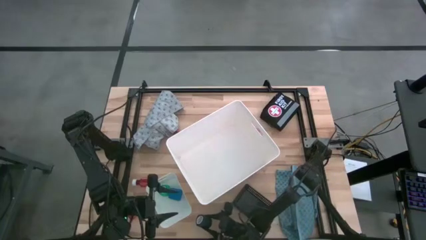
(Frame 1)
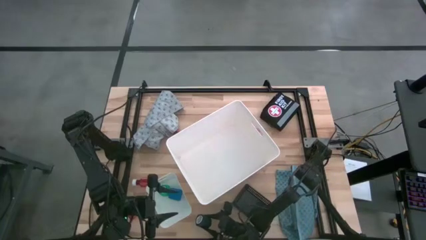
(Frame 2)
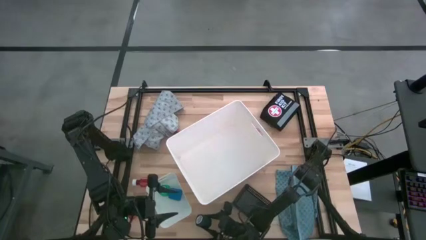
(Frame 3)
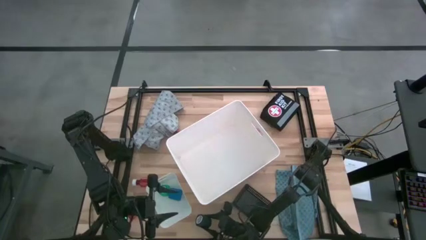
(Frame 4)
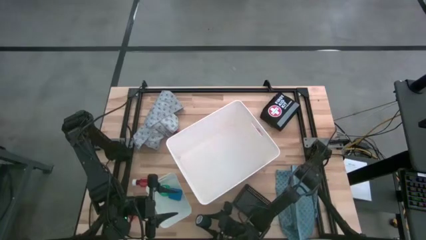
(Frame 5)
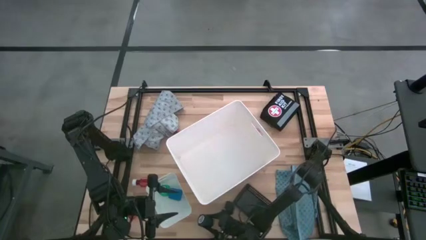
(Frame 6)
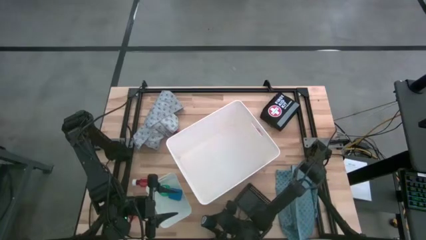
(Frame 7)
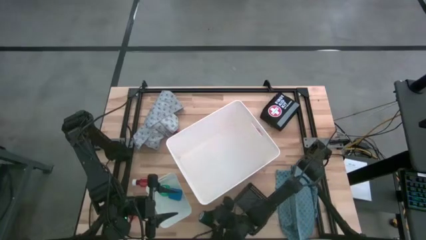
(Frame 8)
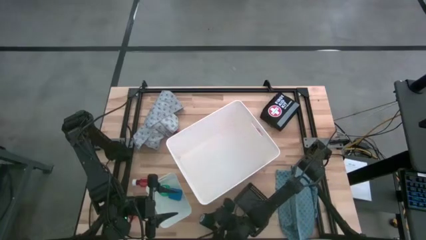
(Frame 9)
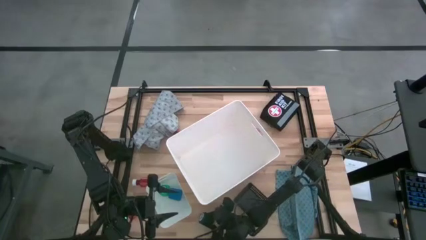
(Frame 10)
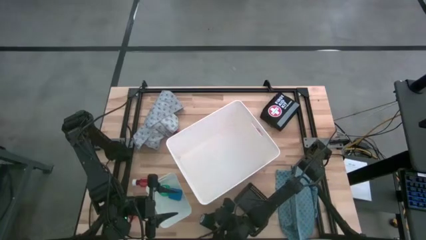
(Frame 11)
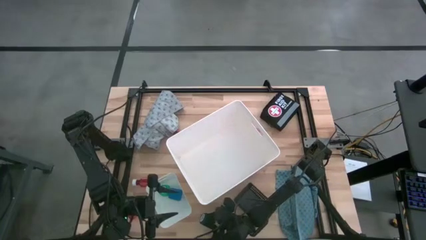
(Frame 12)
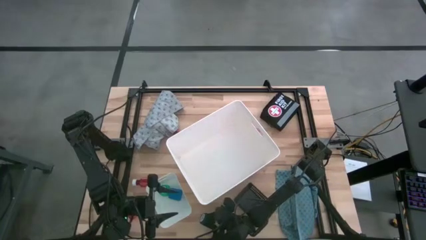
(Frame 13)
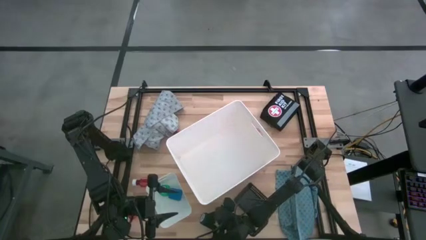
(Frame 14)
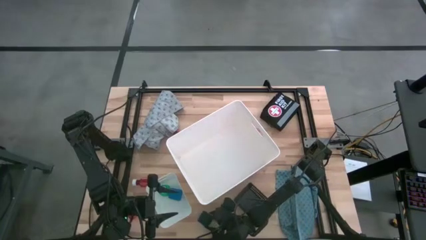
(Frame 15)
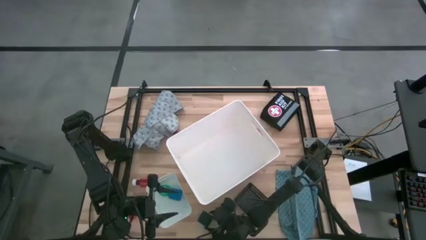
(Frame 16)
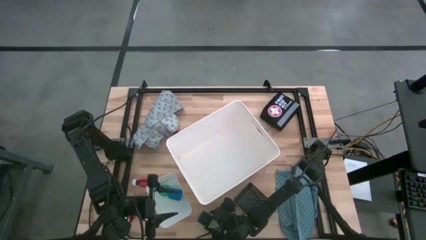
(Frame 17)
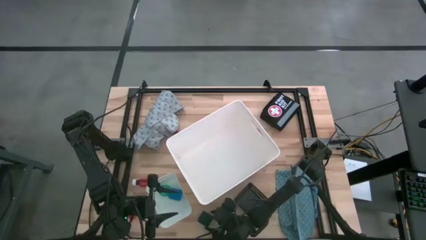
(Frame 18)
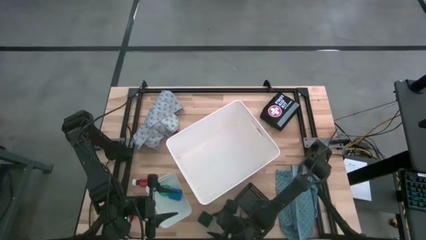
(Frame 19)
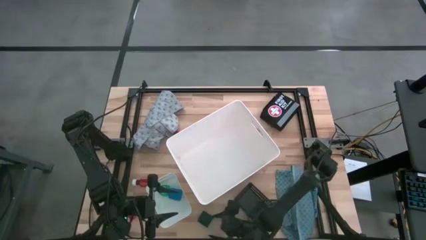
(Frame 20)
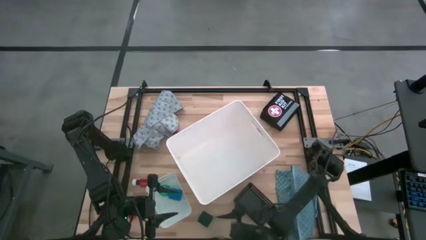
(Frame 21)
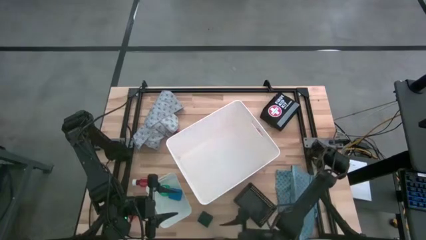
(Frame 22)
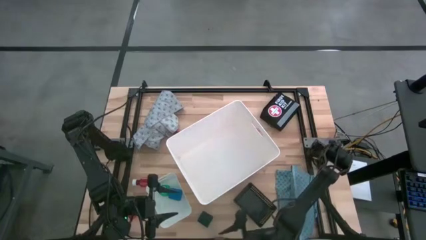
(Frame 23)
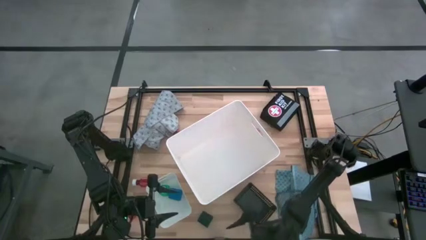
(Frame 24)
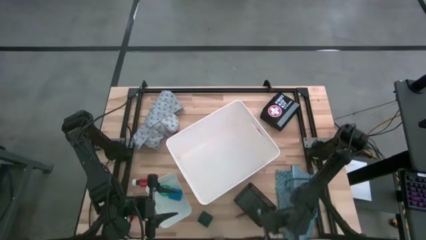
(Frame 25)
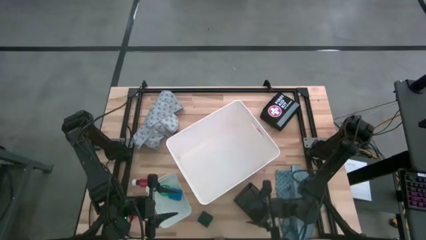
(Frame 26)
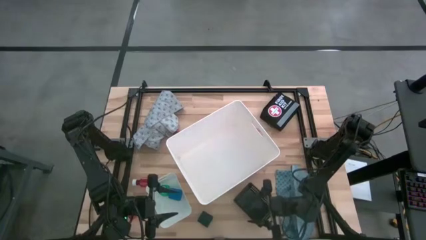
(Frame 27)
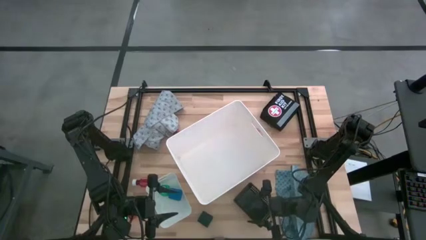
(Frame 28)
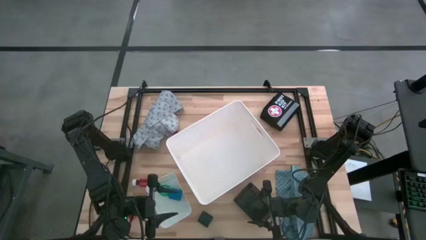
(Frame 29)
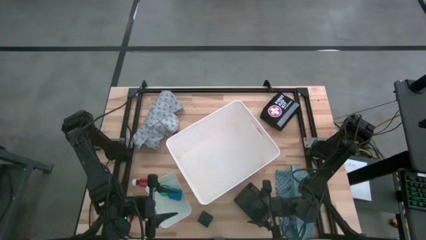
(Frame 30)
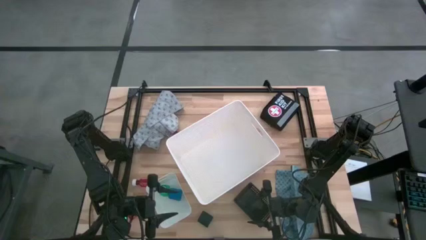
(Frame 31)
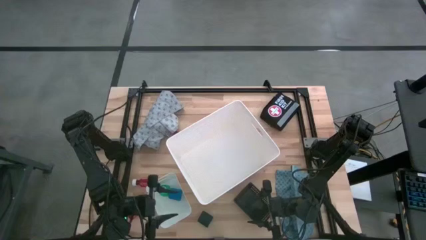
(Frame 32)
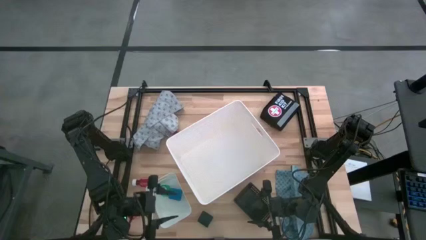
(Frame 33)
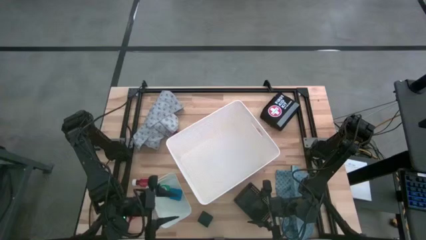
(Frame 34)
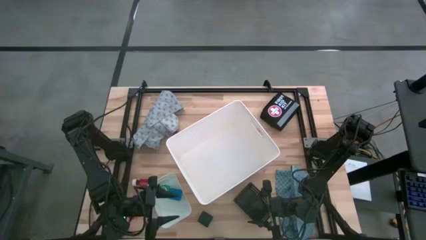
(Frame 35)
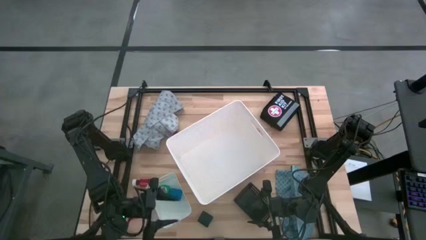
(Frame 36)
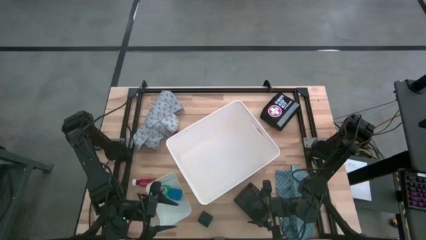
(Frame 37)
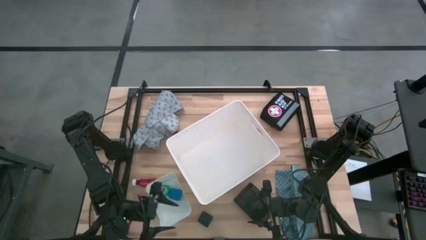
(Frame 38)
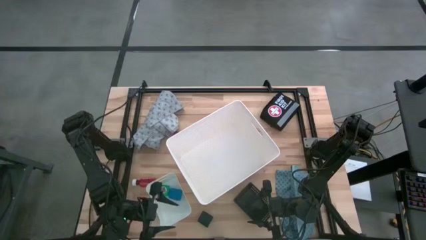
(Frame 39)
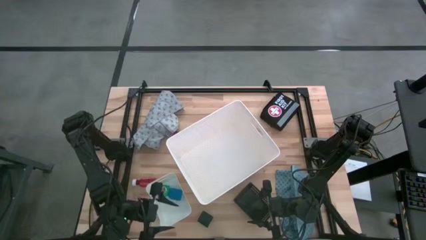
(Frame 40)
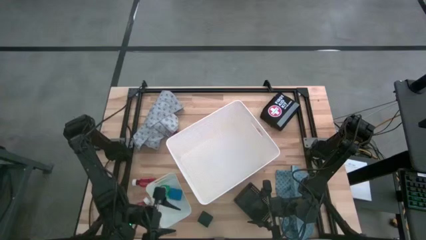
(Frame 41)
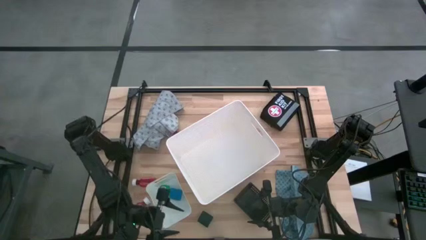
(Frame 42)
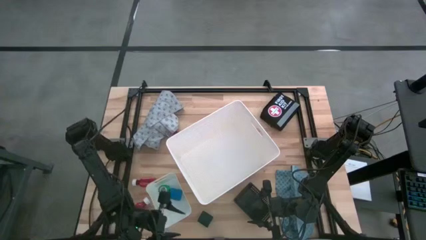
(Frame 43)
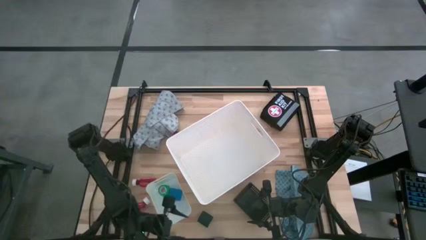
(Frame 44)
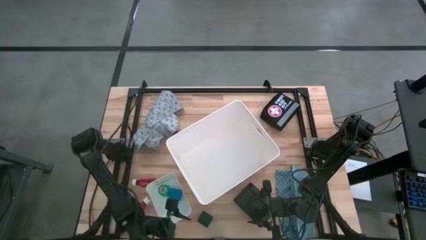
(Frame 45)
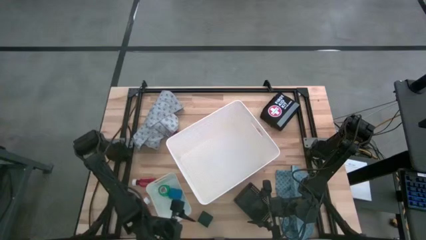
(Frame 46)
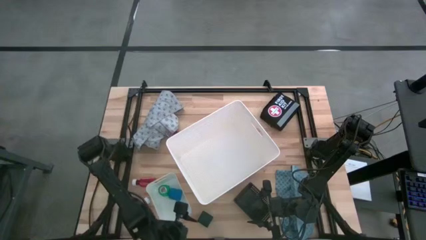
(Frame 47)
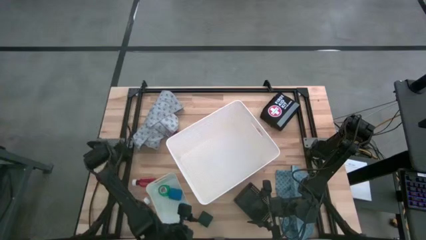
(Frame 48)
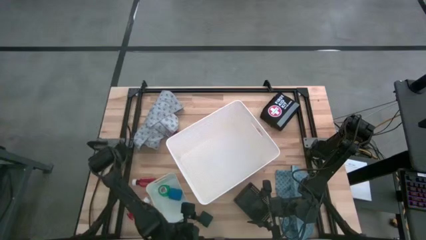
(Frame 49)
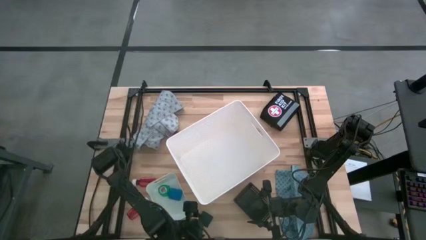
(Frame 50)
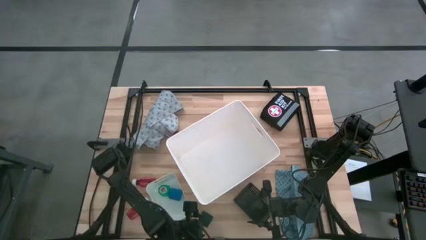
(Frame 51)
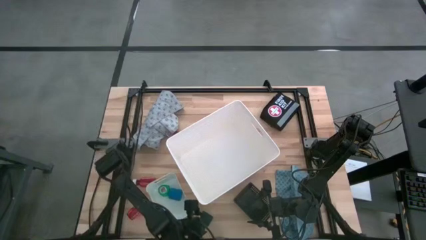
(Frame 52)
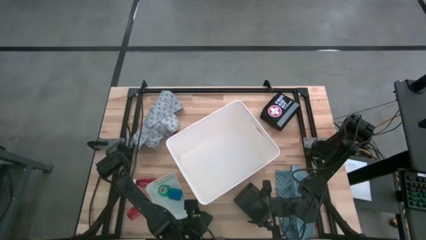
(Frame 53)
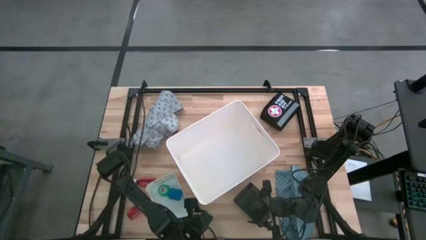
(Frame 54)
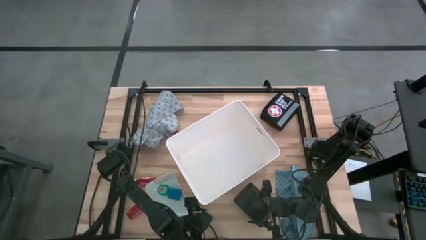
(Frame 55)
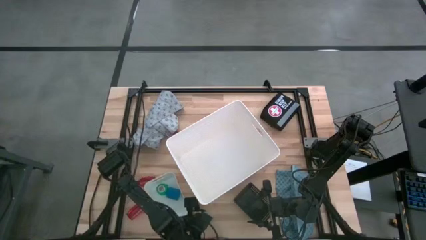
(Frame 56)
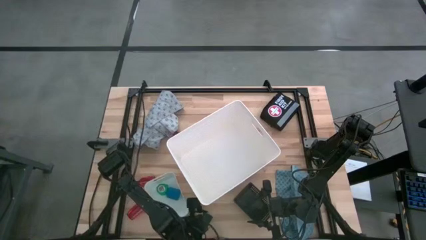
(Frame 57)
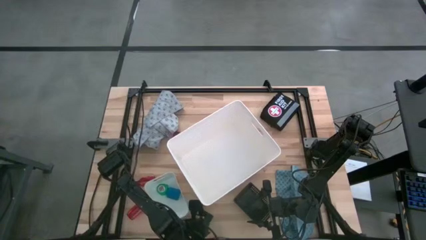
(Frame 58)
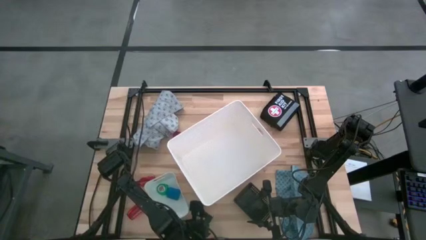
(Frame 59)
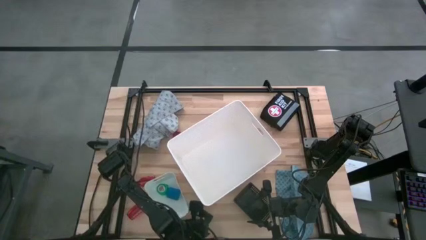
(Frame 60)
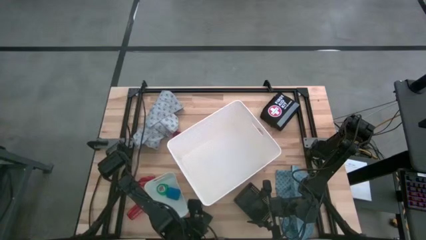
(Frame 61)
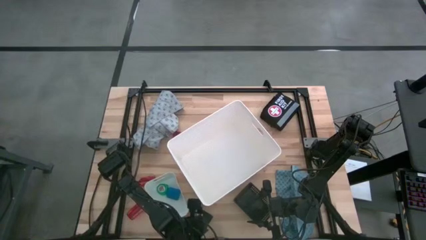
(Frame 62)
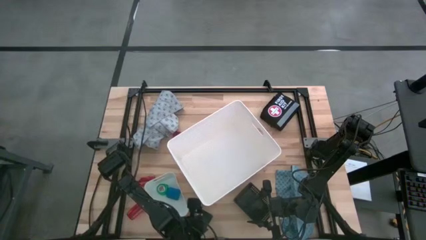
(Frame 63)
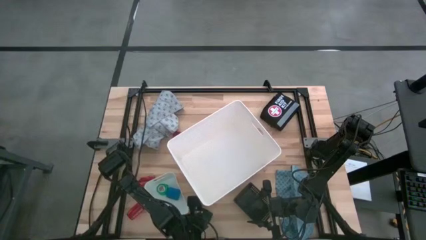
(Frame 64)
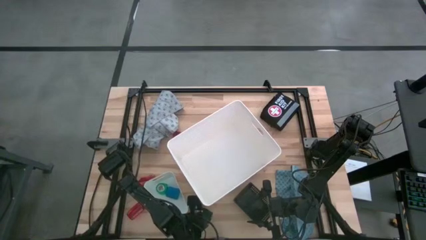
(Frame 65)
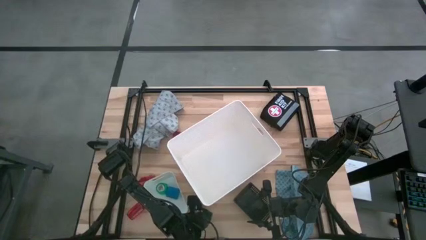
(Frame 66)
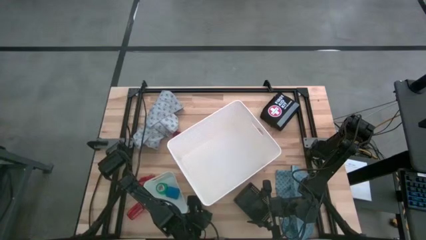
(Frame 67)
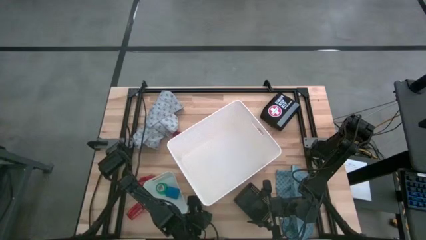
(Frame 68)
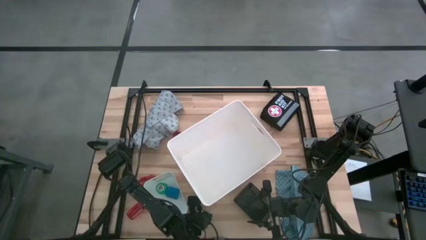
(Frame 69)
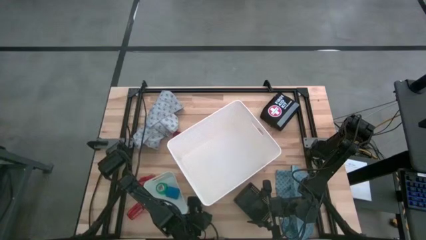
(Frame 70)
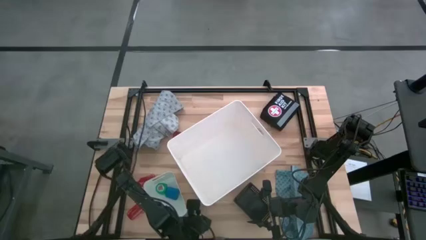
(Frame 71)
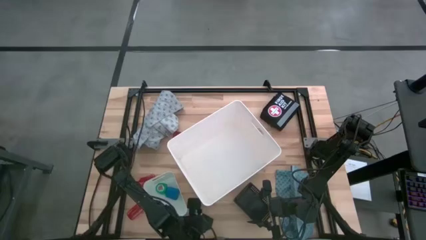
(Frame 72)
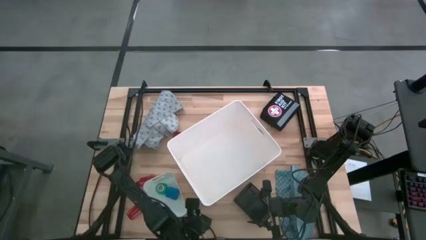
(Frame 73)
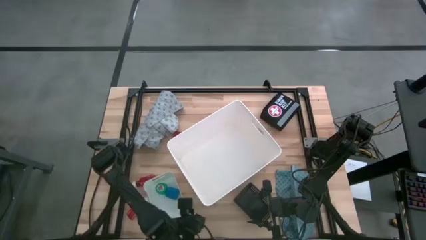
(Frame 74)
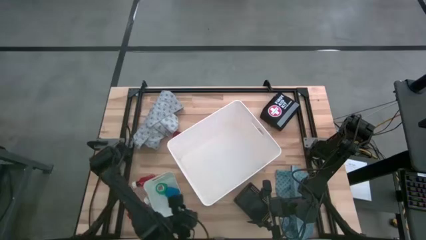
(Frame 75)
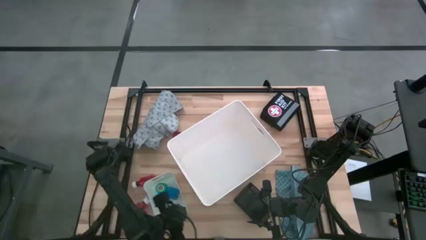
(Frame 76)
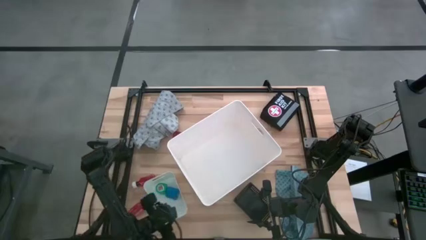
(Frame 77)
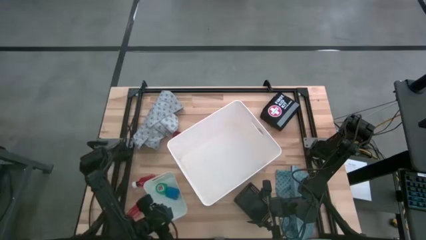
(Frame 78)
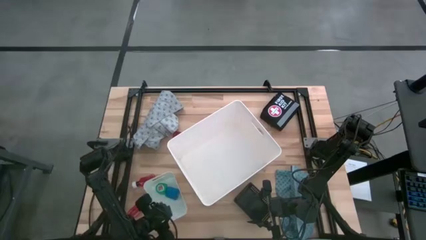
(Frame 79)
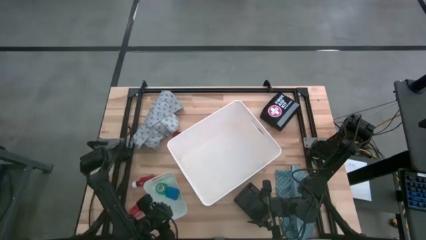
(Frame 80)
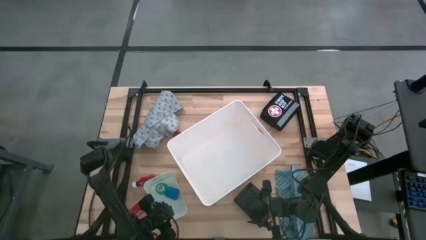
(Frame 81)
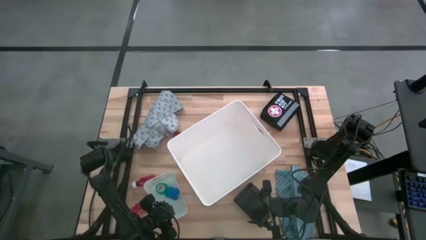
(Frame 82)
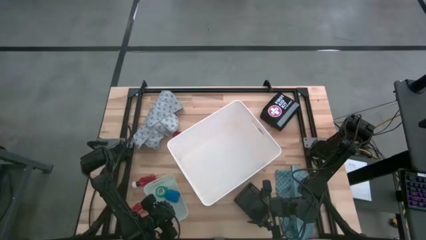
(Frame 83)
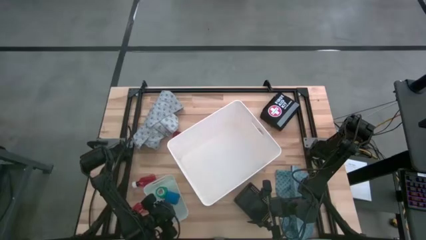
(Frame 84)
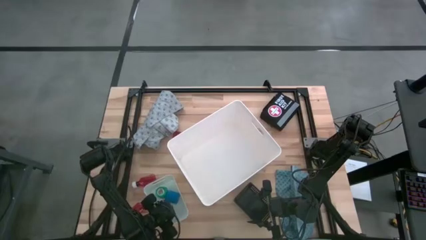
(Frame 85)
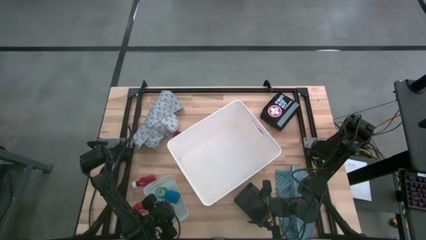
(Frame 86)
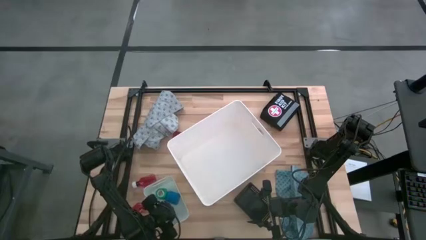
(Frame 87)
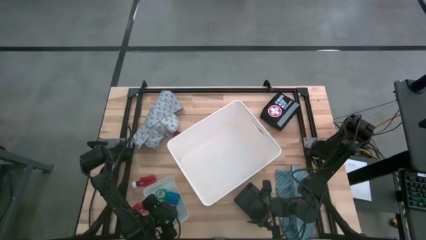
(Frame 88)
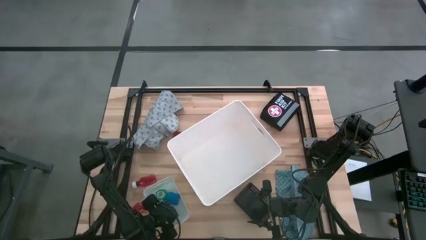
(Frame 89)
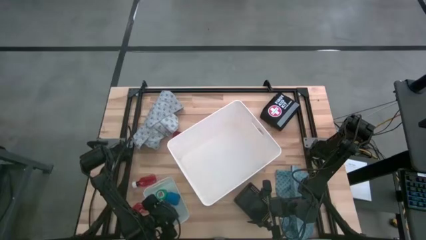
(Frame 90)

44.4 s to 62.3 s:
Task: Pick & place medical supplies in basket/bin
Put the dark green bandage into the white bin
